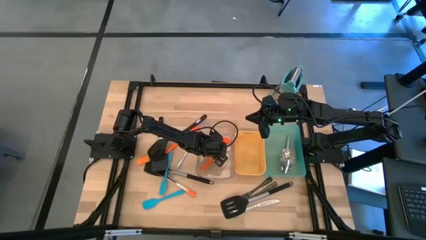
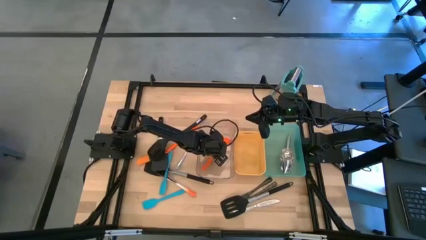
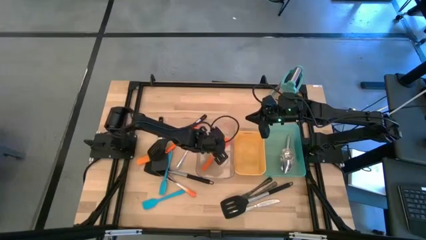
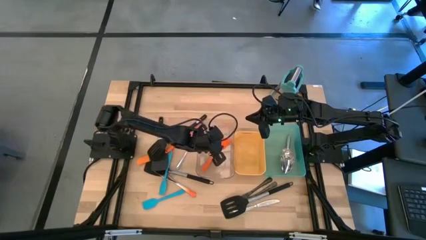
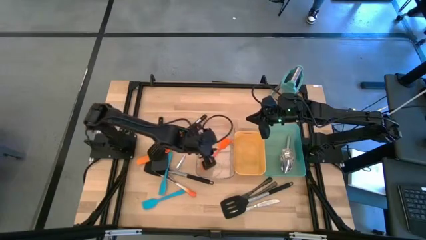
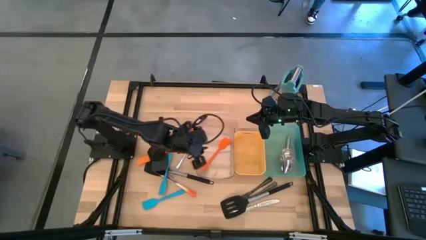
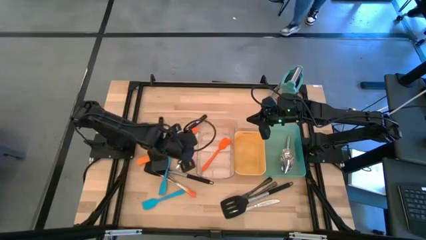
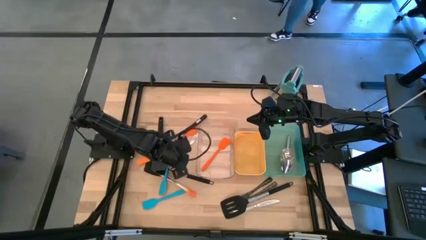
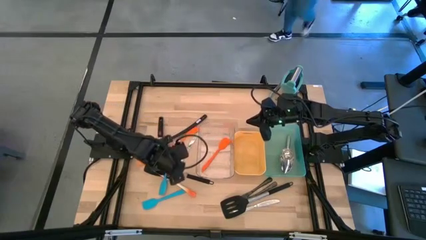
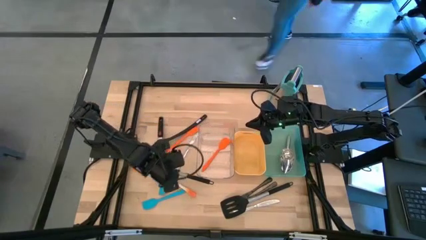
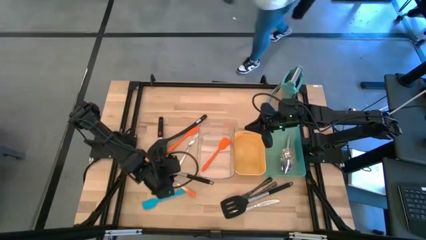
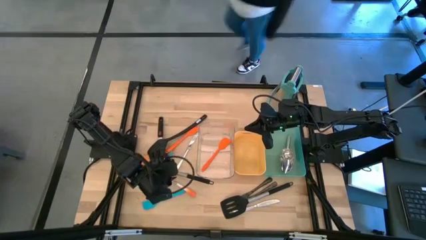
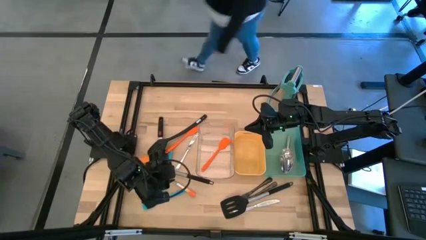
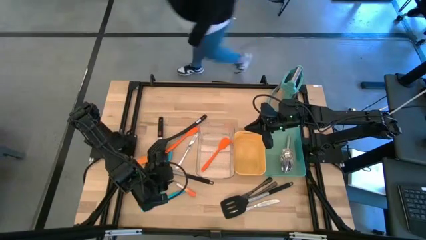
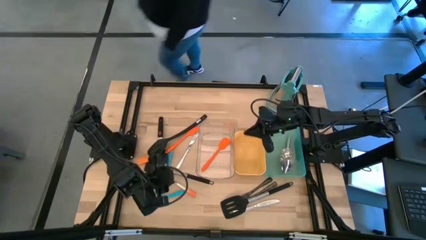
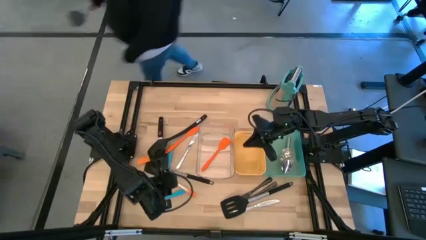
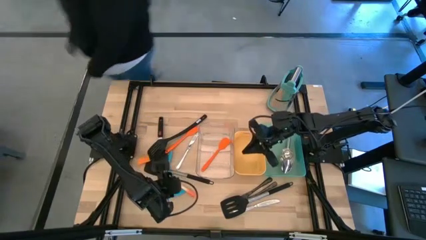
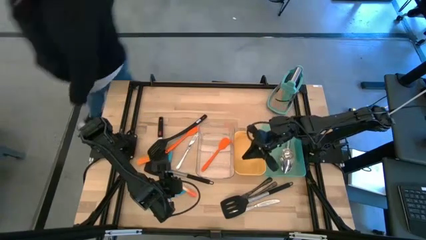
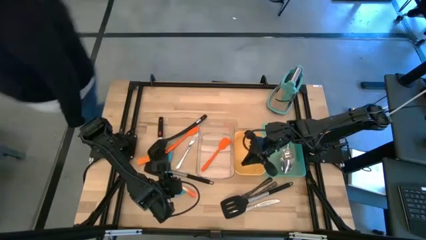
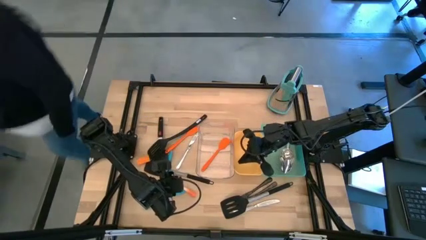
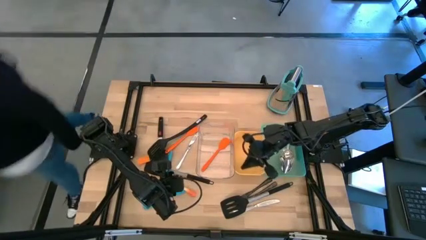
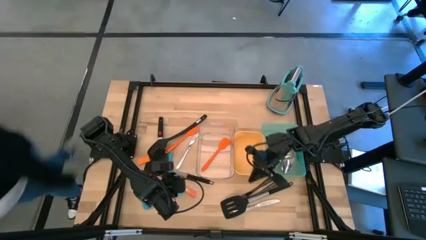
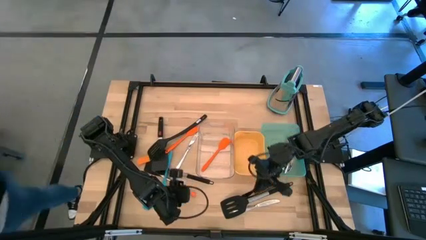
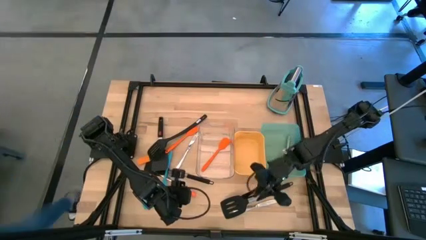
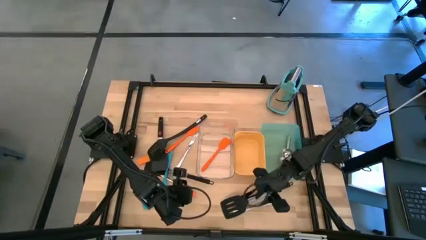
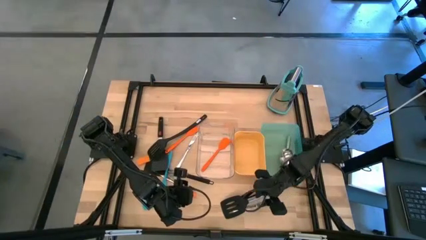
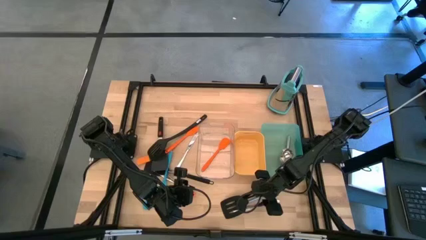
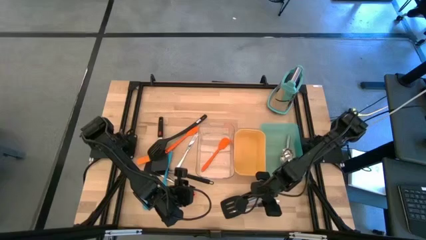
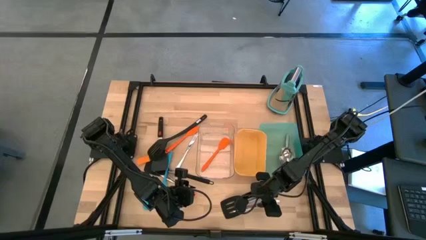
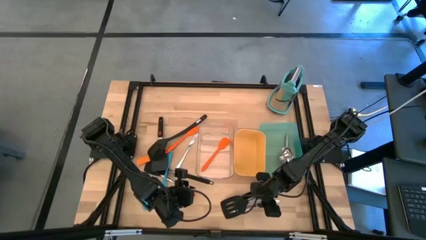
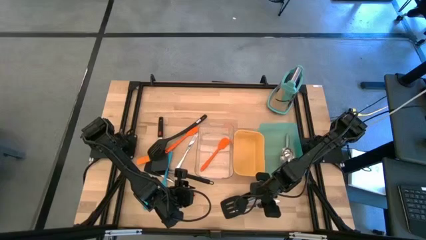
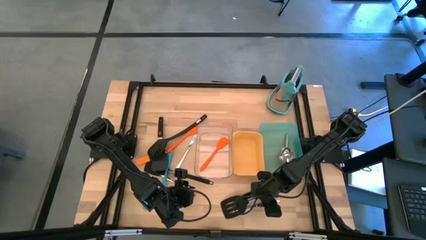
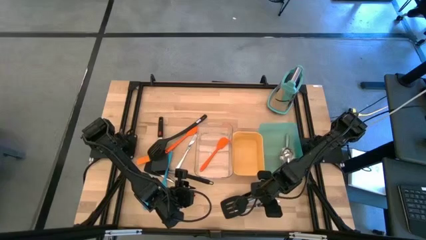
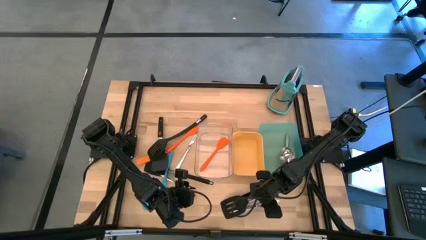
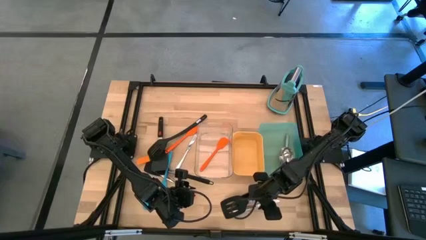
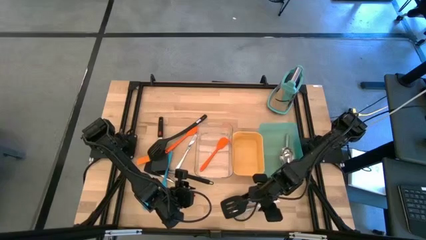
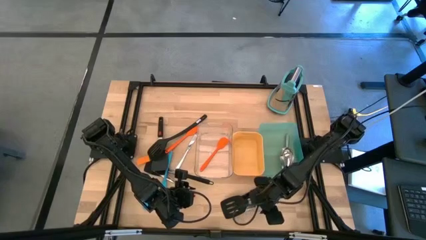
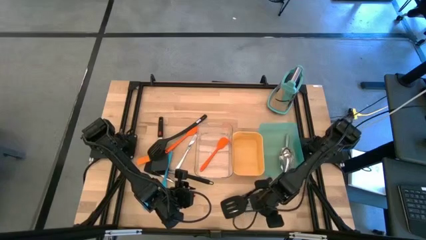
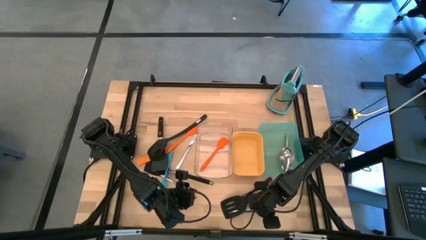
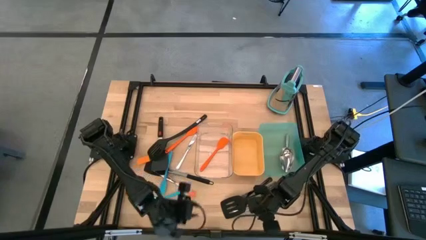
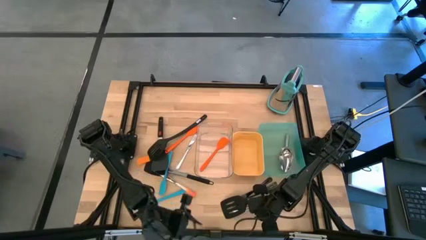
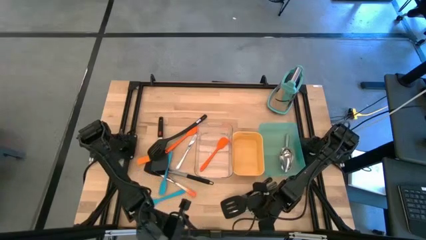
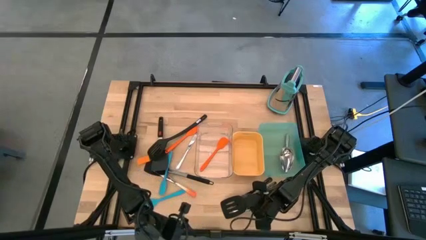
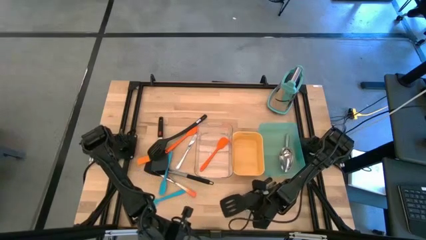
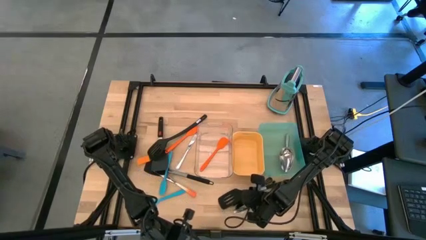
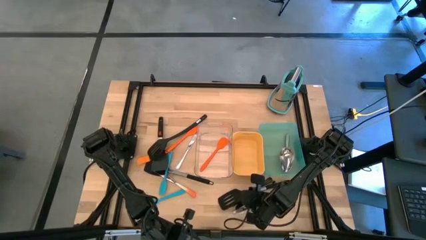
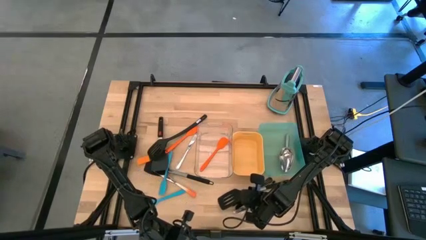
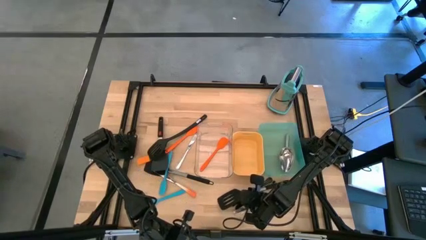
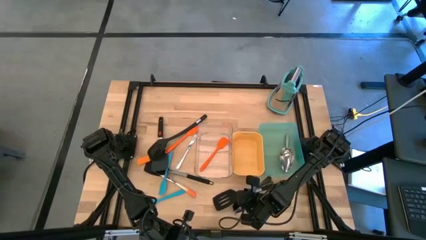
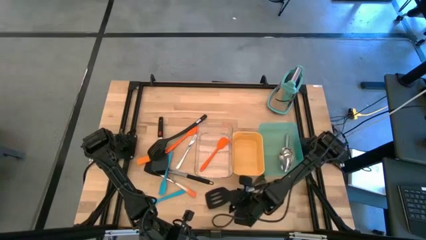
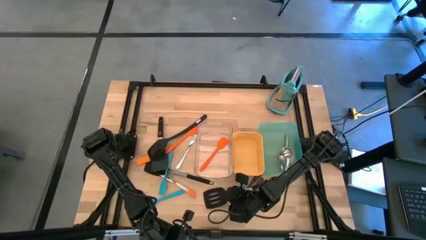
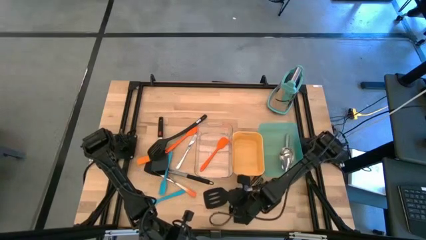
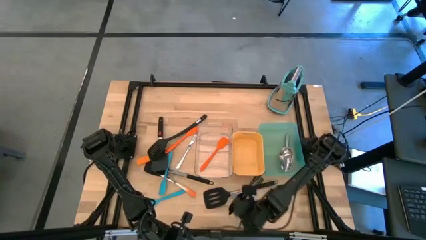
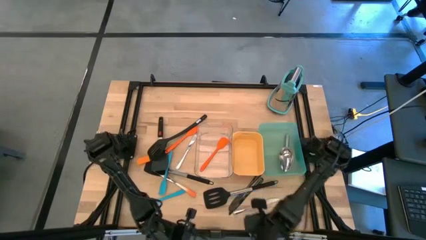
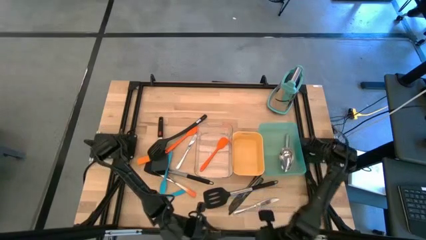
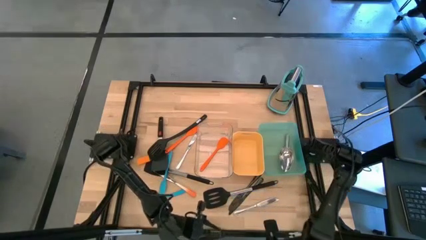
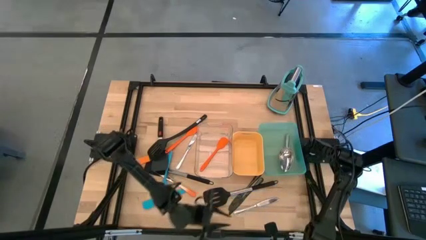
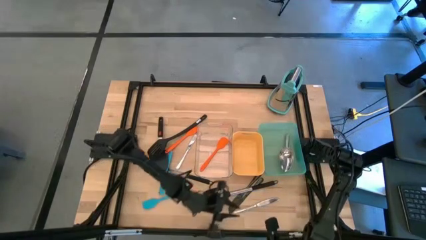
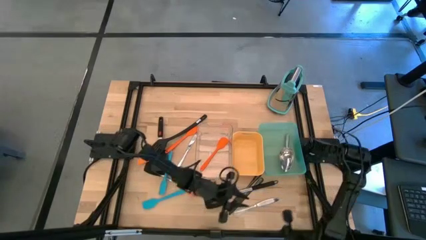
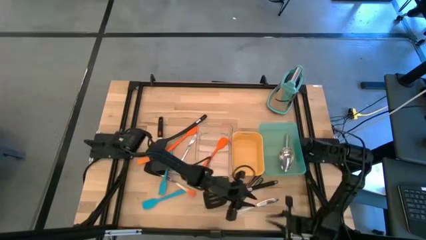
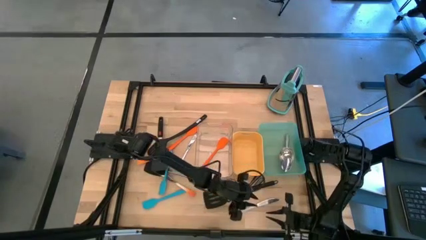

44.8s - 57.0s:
Task: Pick & Place Kitchen Items
Put the silver table knife into the yellow bin
